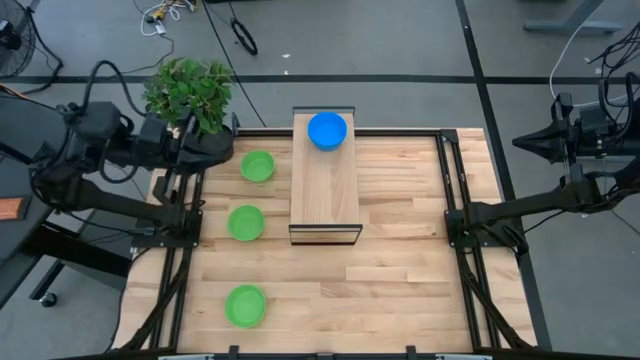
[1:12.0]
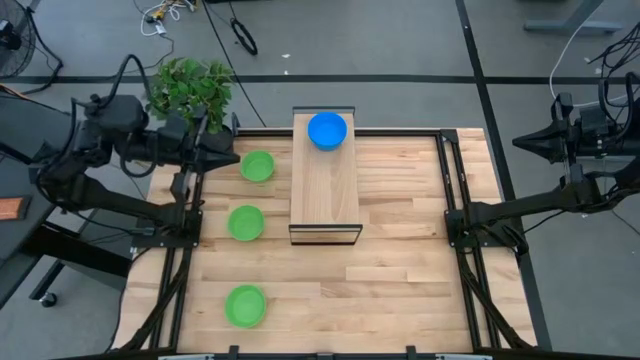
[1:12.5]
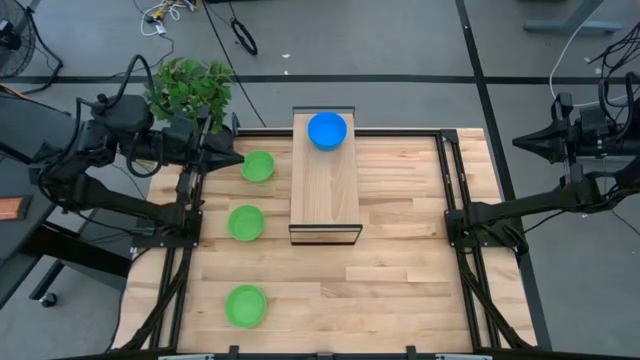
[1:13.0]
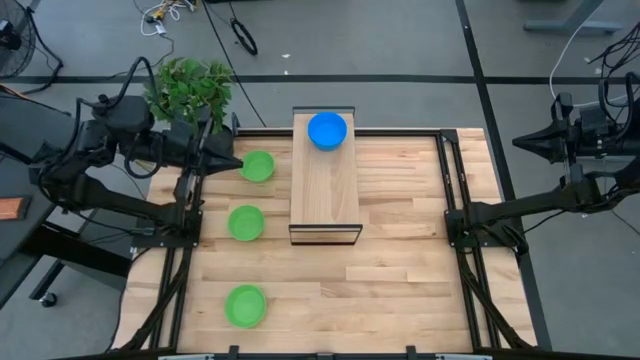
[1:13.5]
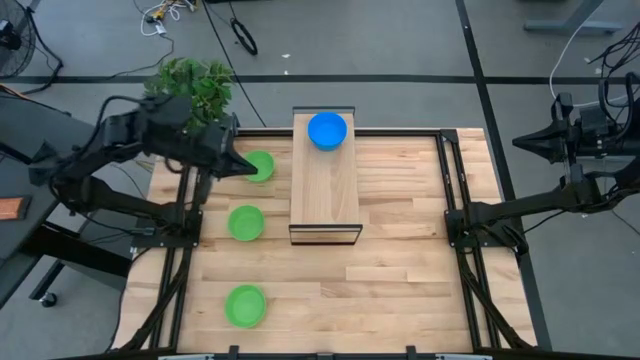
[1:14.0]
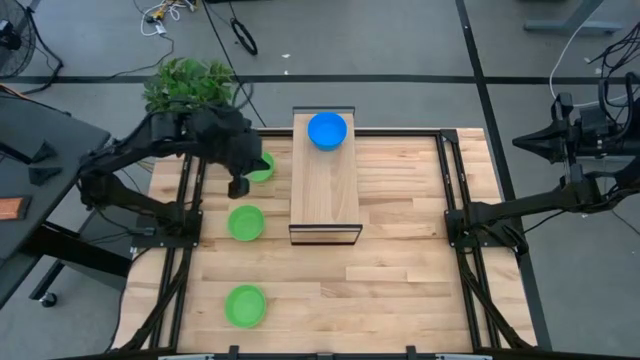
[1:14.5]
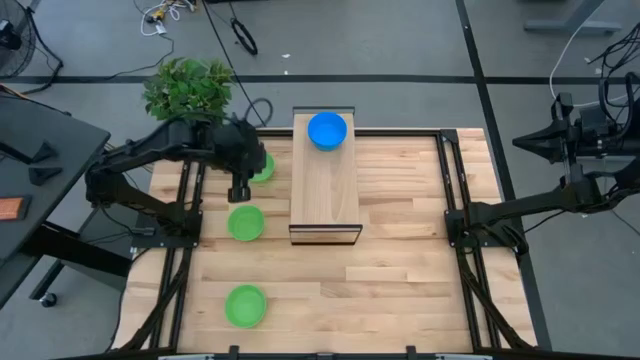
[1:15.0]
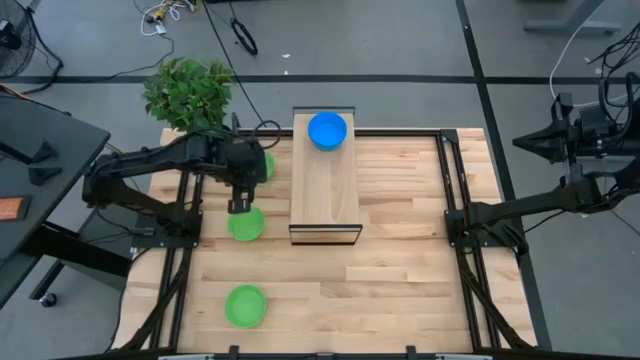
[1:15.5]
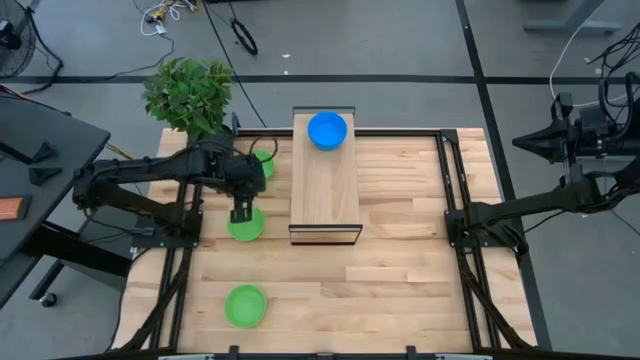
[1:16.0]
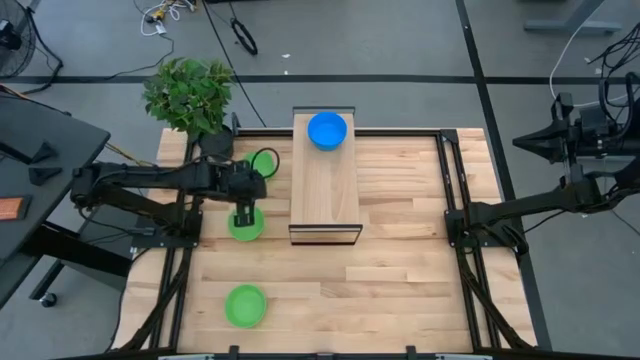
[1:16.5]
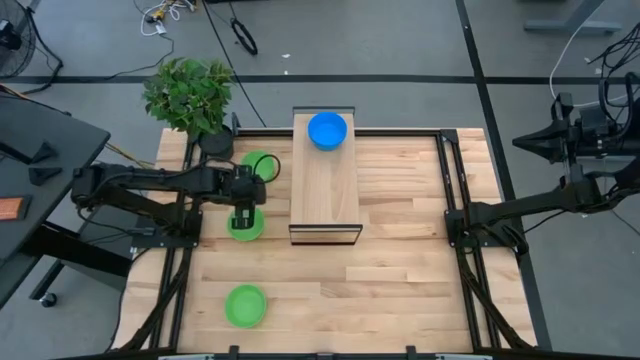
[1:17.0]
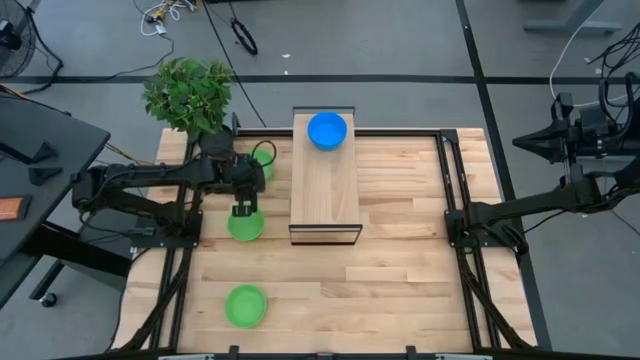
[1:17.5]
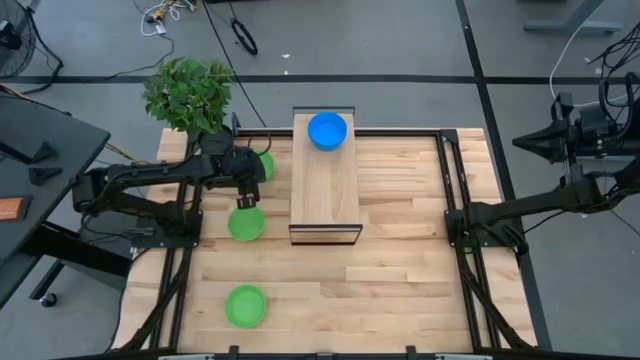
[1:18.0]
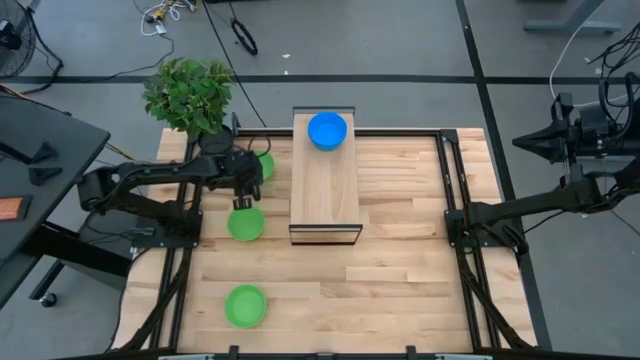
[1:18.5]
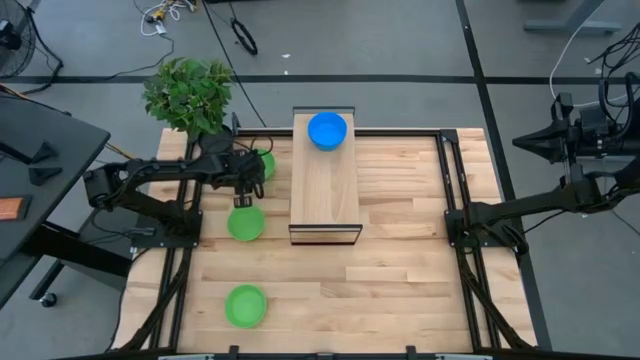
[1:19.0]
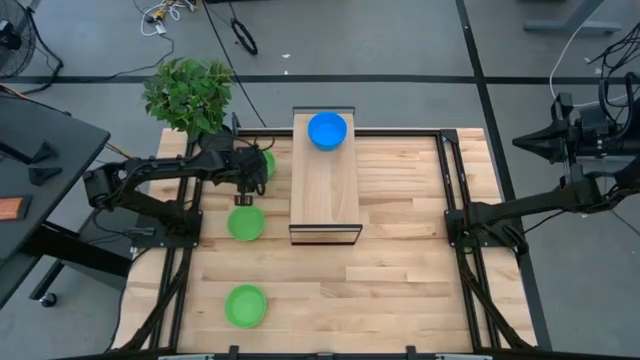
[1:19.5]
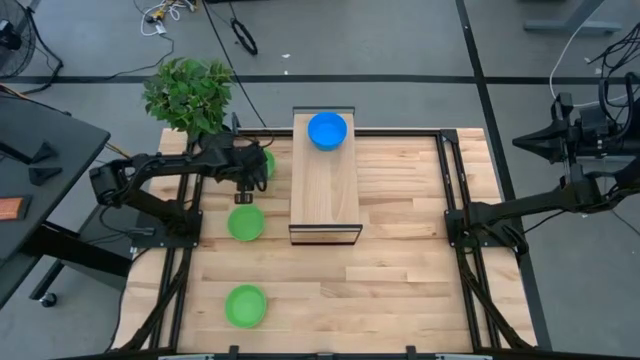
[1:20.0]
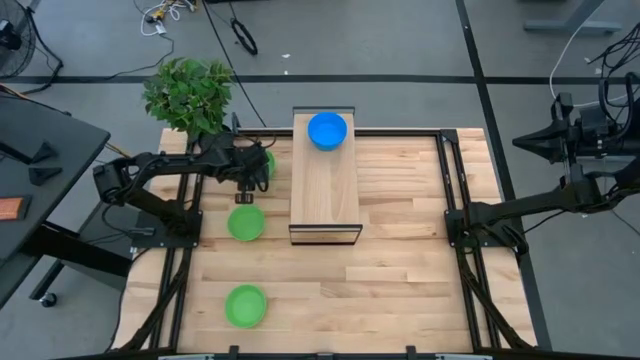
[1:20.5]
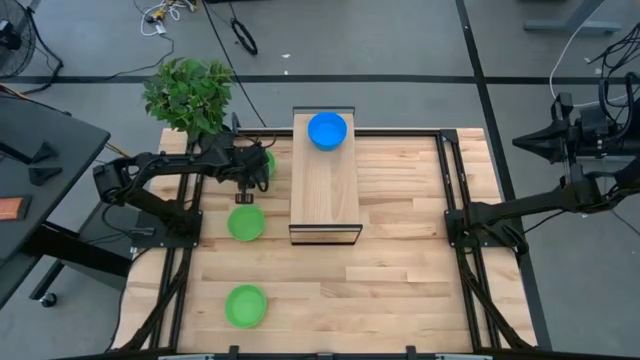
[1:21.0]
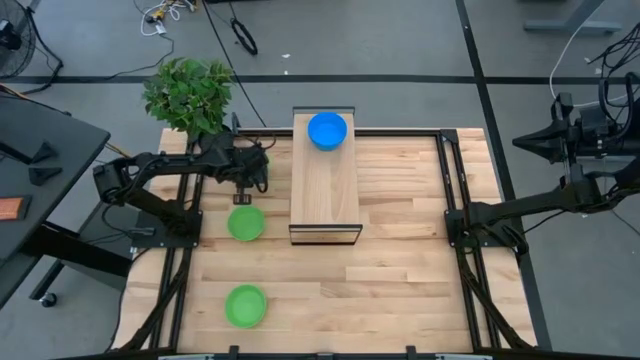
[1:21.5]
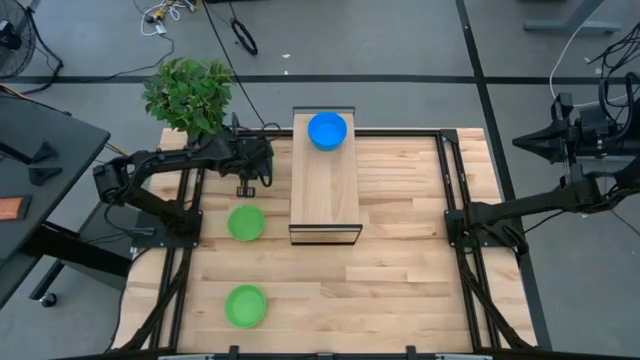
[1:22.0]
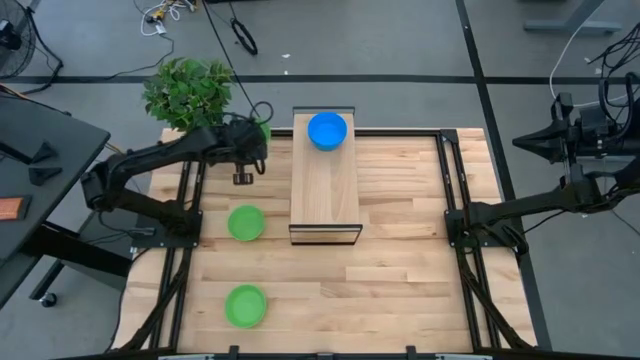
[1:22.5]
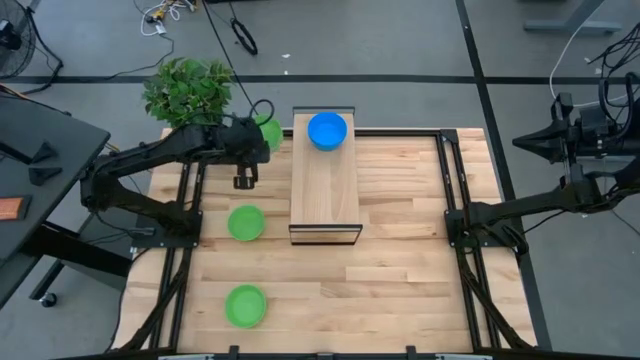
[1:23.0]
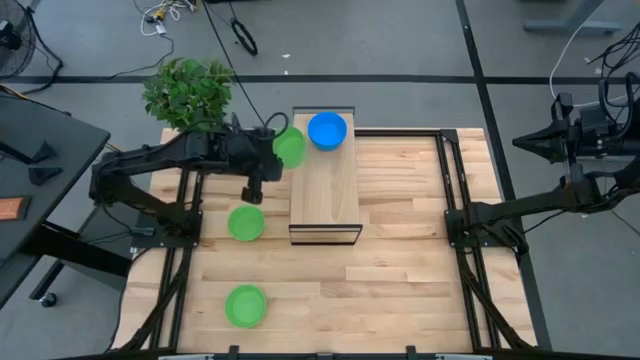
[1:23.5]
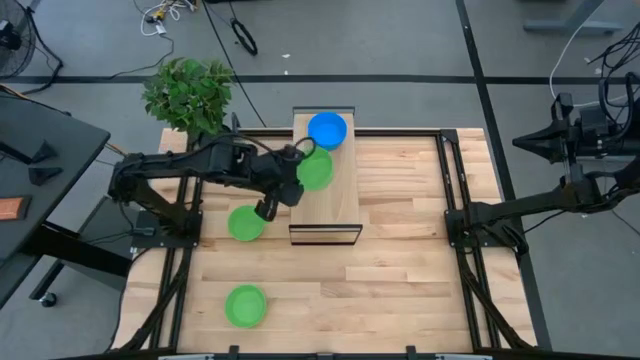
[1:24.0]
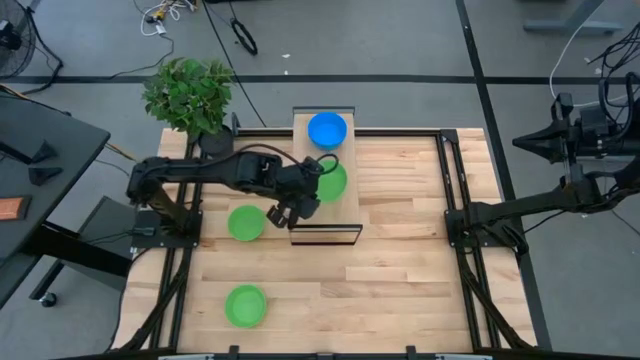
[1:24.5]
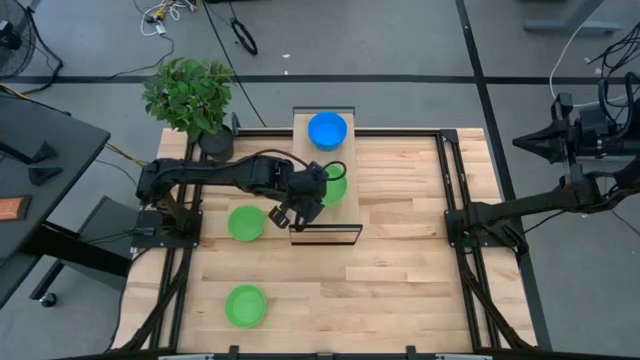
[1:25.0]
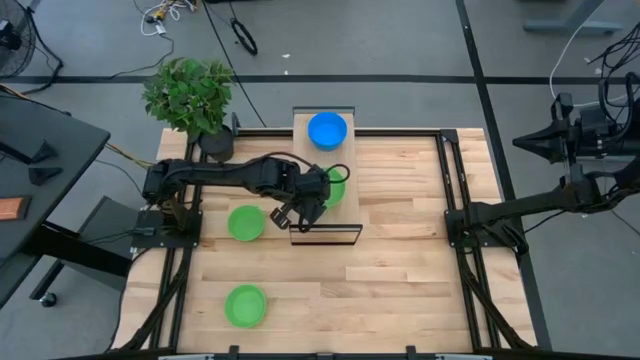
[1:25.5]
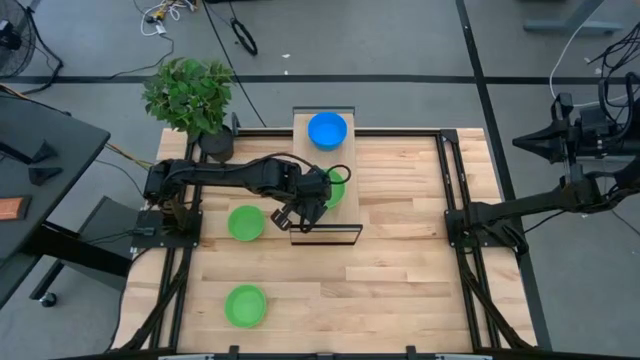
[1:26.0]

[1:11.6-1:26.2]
Task: Pick & Place Mini bowls
Put the top green bowl on the shelf

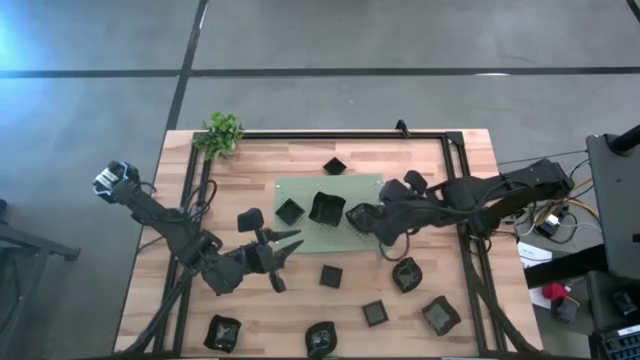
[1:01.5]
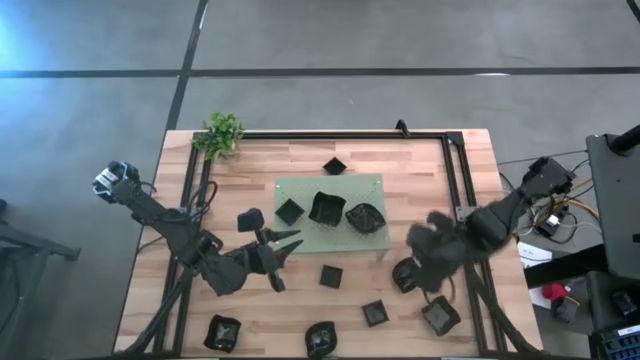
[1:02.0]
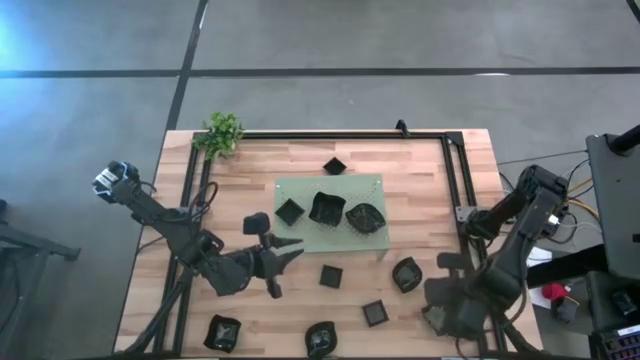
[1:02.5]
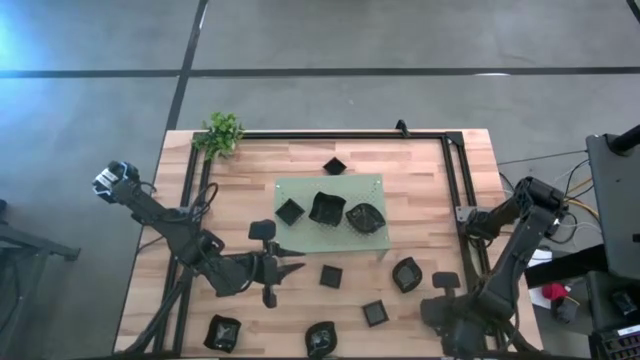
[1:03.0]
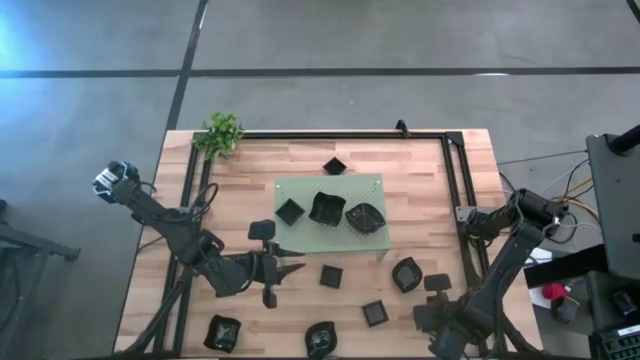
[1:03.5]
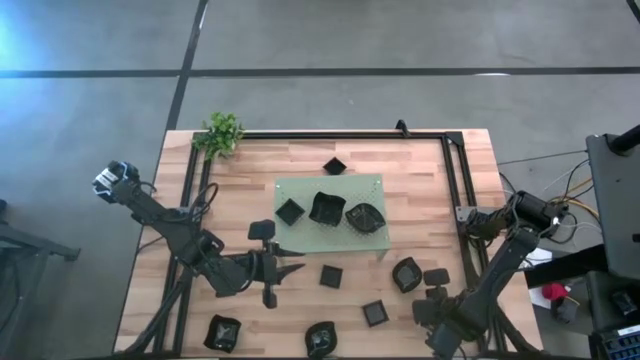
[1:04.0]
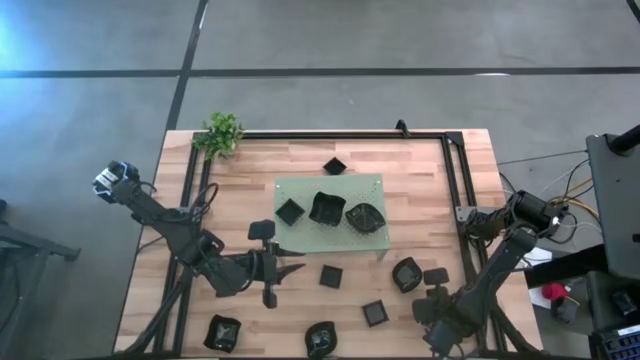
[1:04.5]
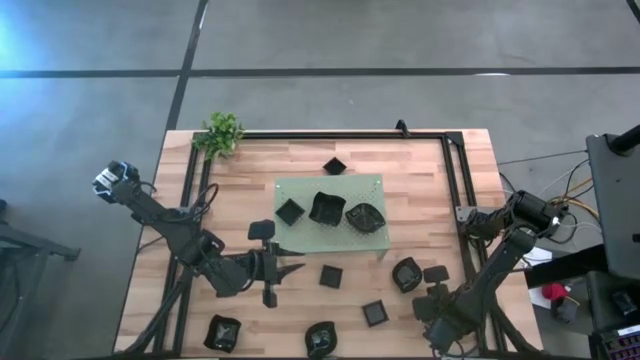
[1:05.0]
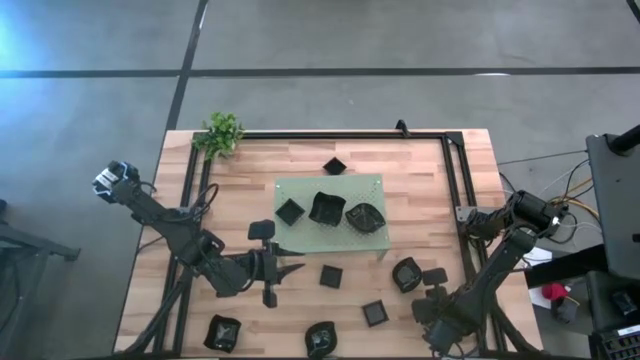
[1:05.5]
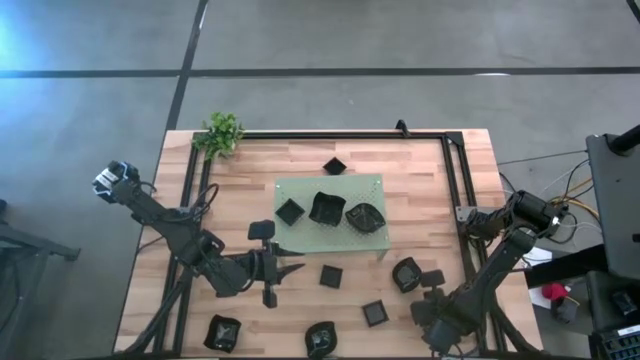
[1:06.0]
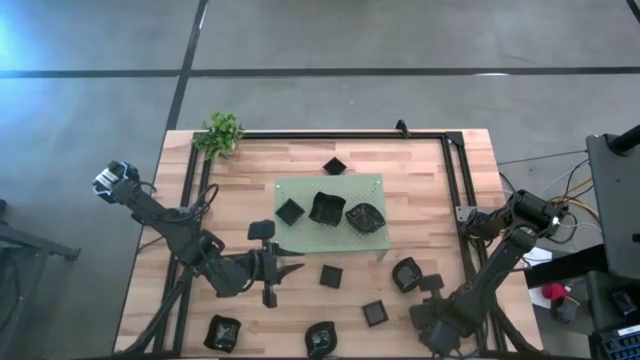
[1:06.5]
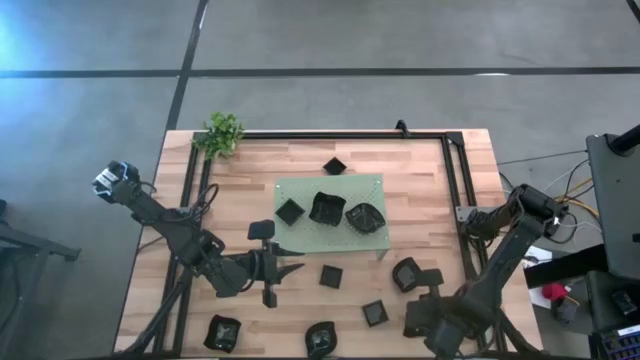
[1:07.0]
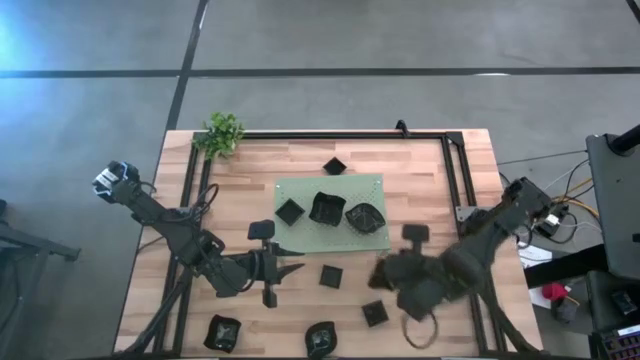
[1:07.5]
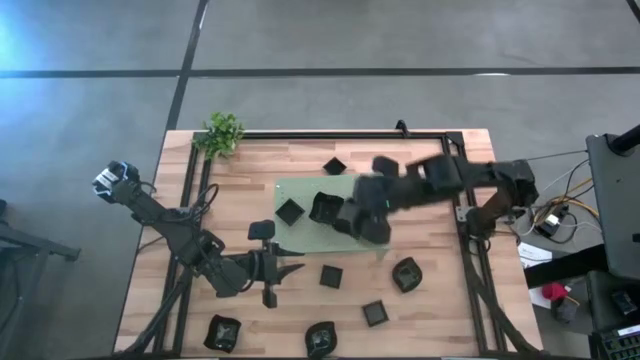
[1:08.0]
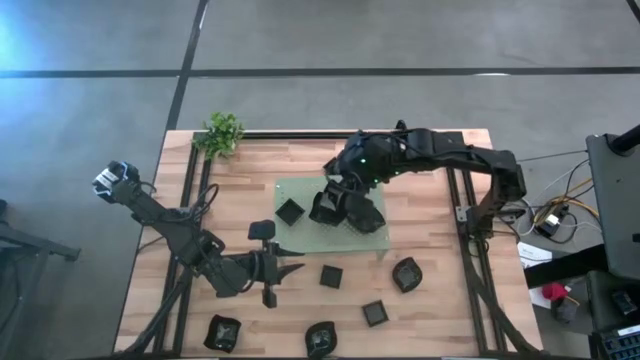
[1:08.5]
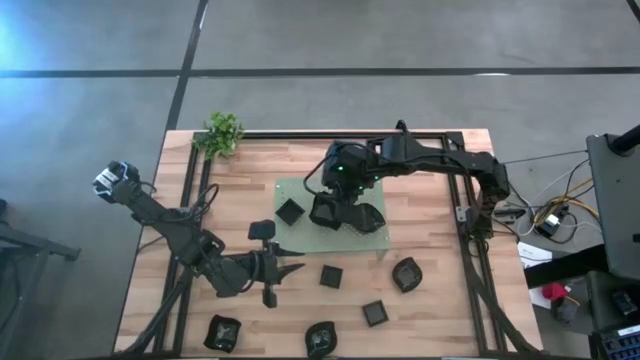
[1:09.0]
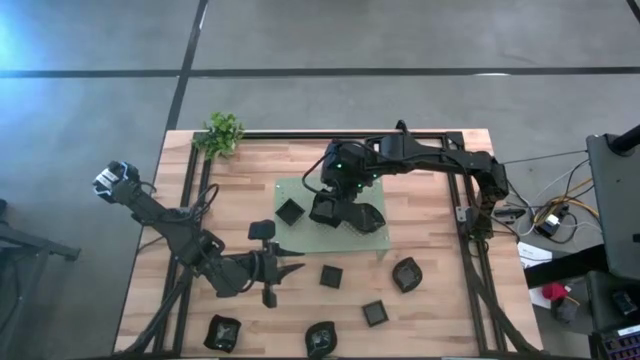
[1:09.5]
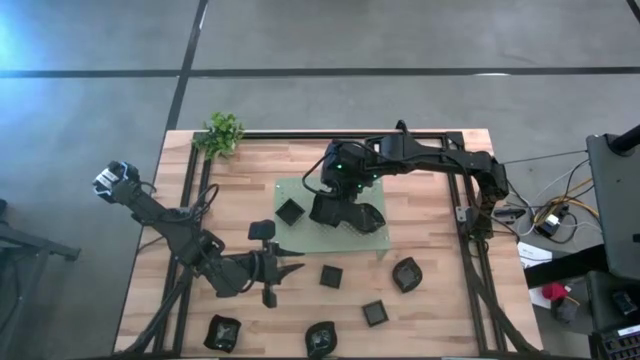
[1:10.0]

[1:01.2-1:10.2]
Task: Pick & Place Mini shaped plates
Stack the distorted square plate on top of the distorted square plates on the shelf
